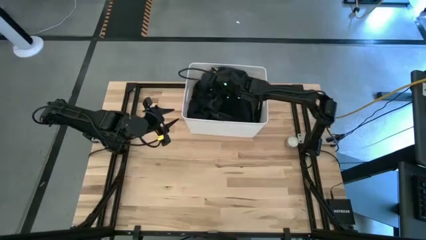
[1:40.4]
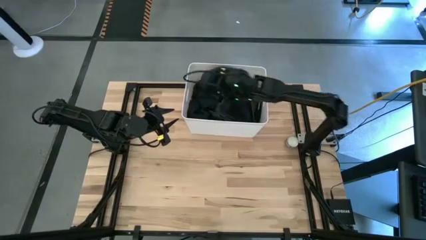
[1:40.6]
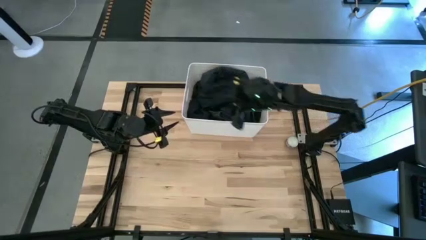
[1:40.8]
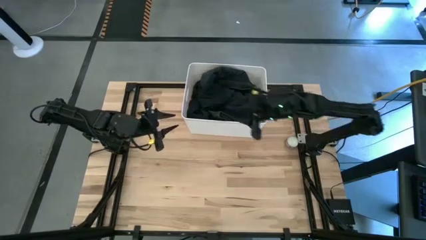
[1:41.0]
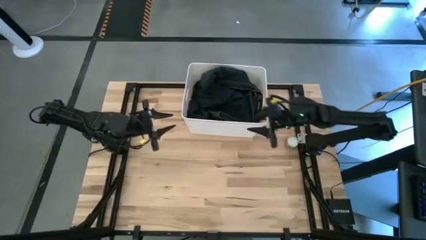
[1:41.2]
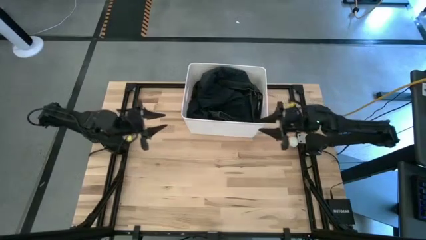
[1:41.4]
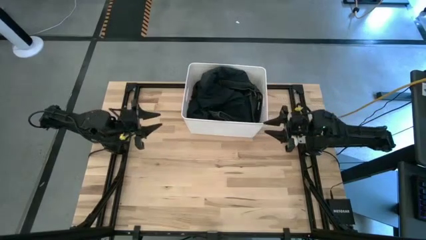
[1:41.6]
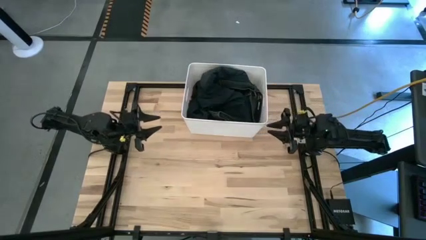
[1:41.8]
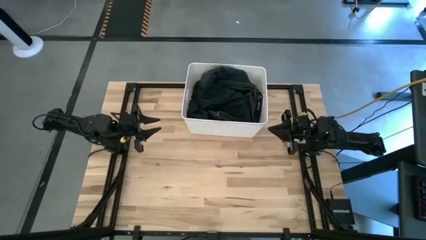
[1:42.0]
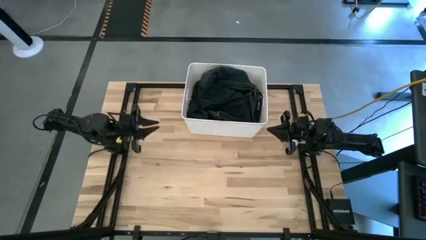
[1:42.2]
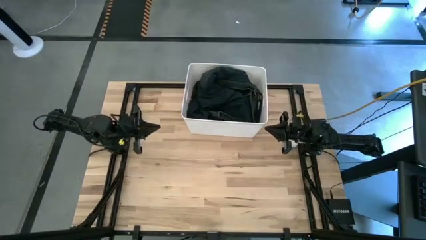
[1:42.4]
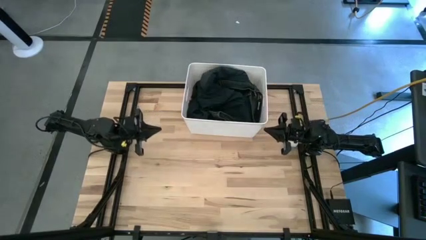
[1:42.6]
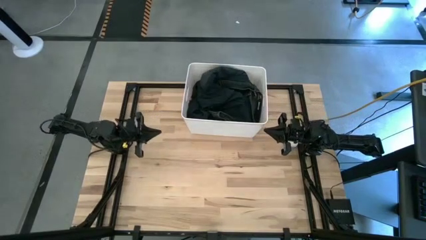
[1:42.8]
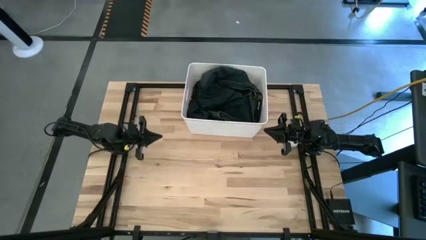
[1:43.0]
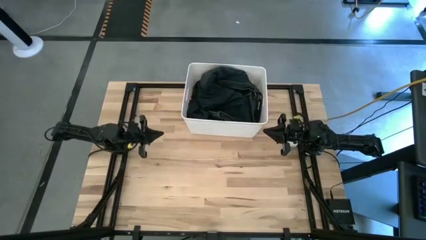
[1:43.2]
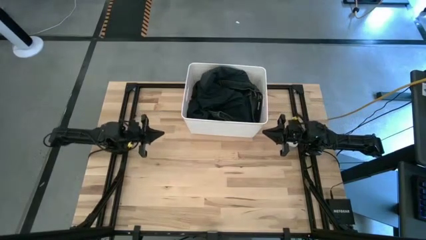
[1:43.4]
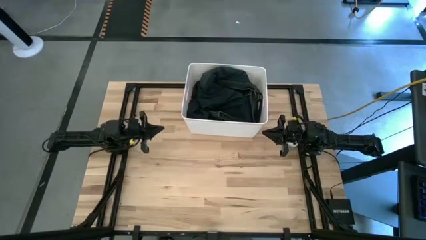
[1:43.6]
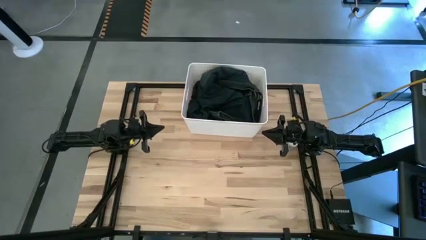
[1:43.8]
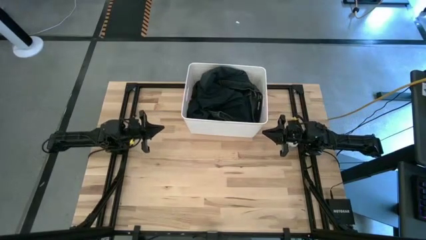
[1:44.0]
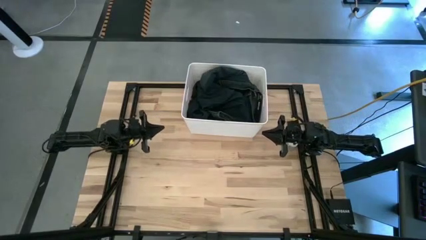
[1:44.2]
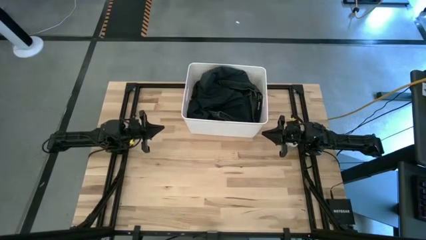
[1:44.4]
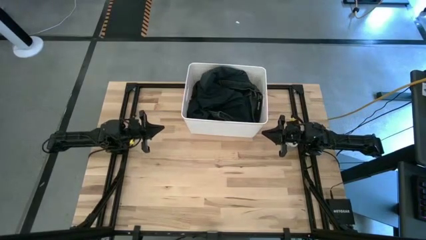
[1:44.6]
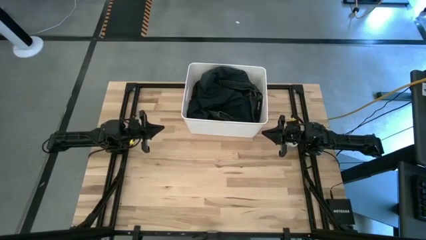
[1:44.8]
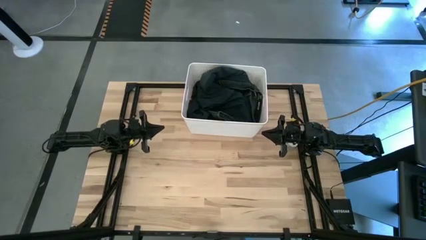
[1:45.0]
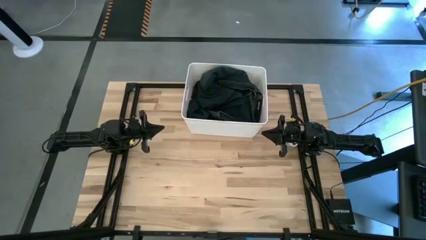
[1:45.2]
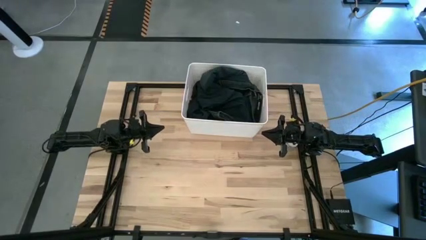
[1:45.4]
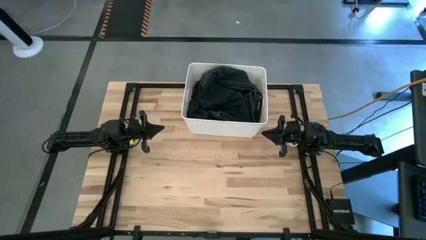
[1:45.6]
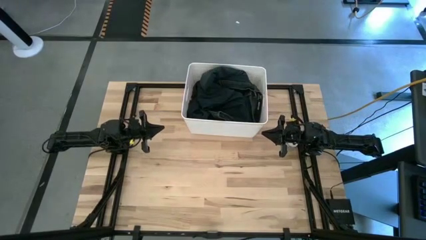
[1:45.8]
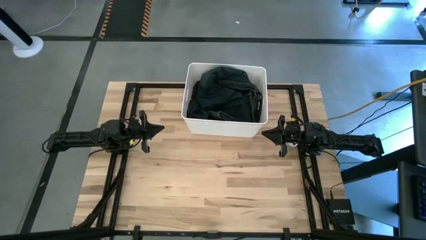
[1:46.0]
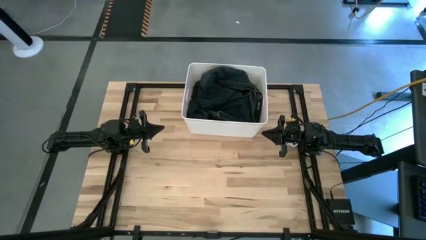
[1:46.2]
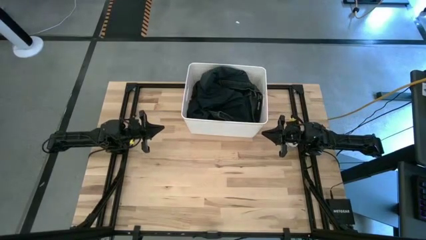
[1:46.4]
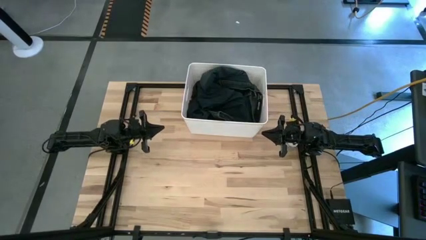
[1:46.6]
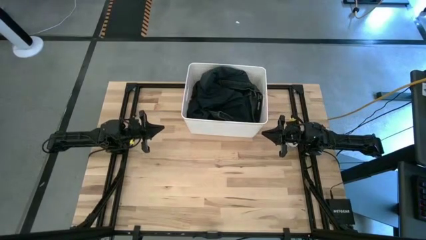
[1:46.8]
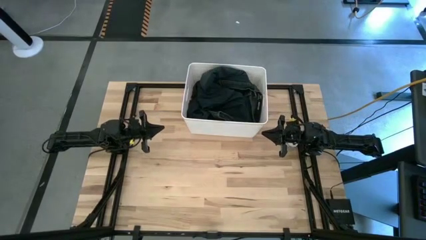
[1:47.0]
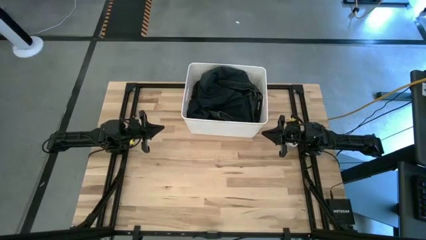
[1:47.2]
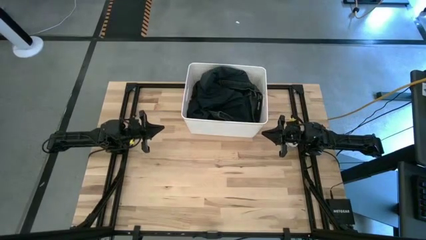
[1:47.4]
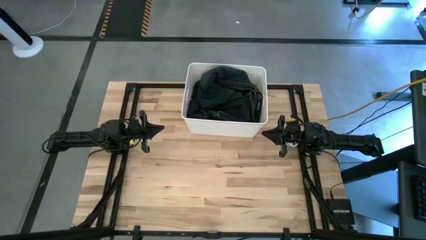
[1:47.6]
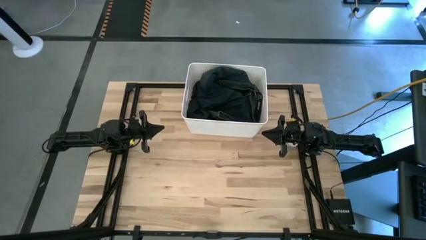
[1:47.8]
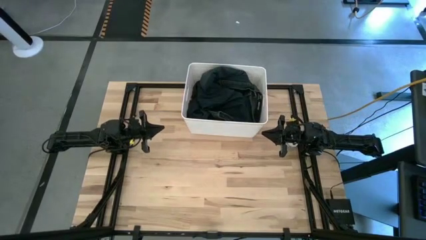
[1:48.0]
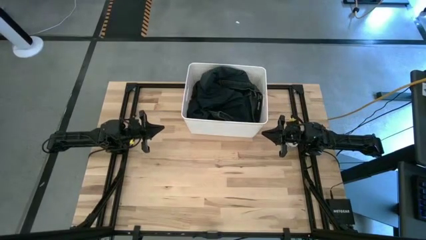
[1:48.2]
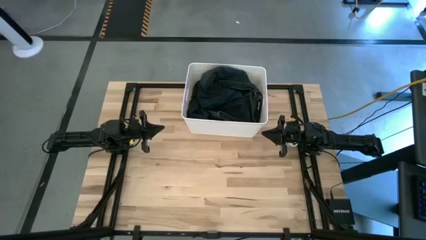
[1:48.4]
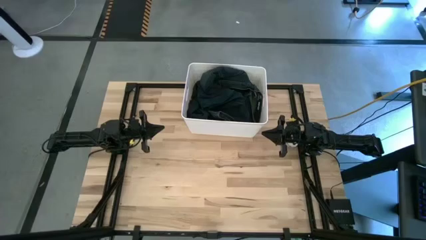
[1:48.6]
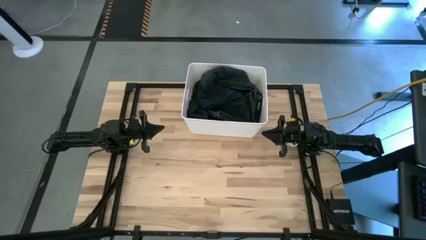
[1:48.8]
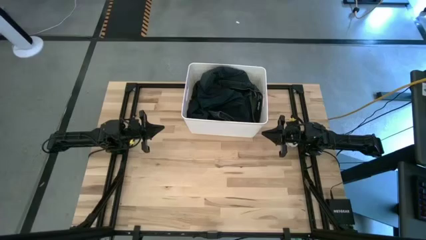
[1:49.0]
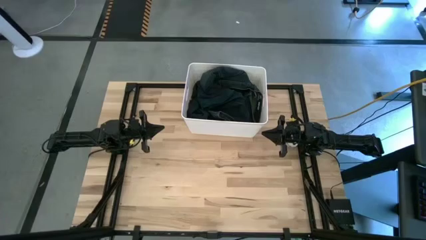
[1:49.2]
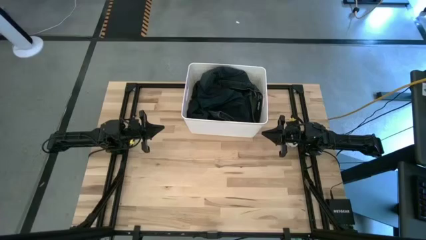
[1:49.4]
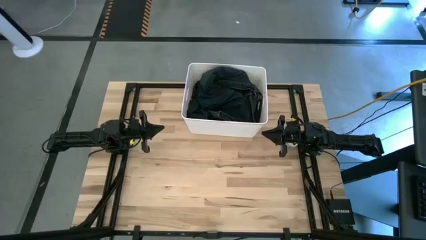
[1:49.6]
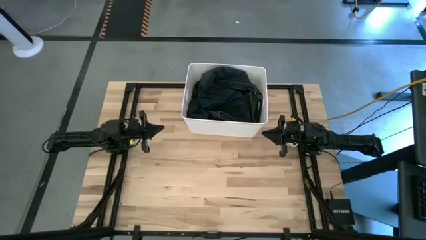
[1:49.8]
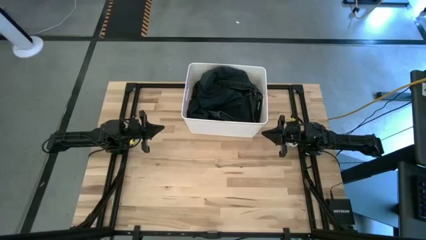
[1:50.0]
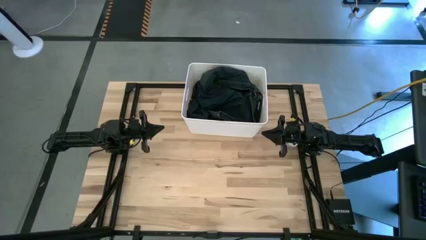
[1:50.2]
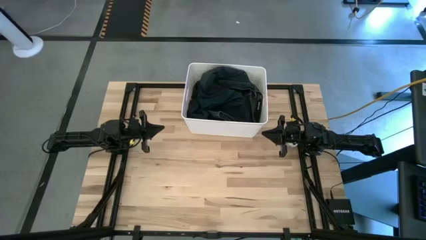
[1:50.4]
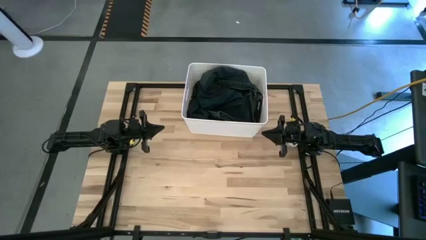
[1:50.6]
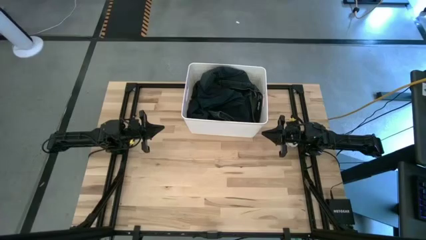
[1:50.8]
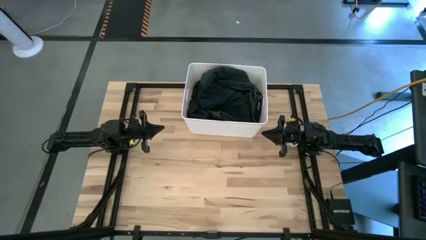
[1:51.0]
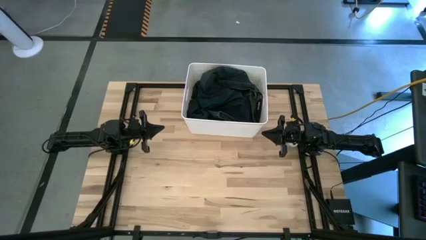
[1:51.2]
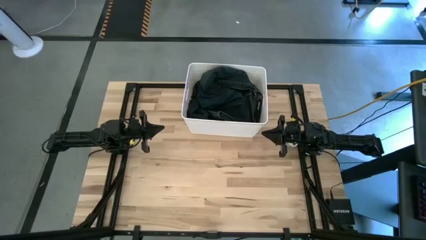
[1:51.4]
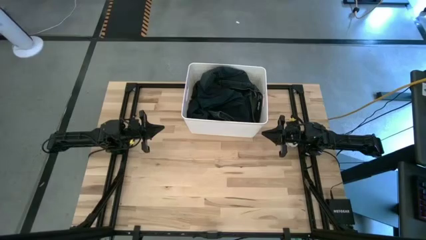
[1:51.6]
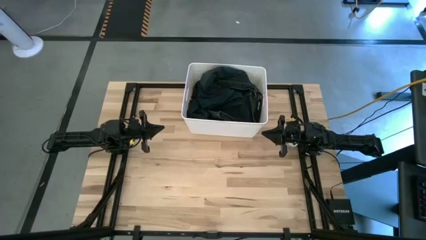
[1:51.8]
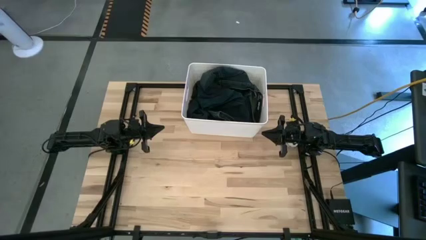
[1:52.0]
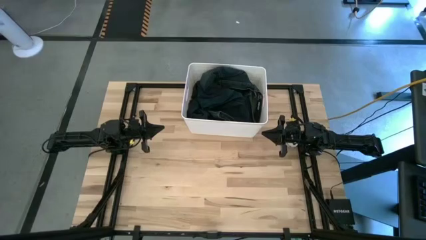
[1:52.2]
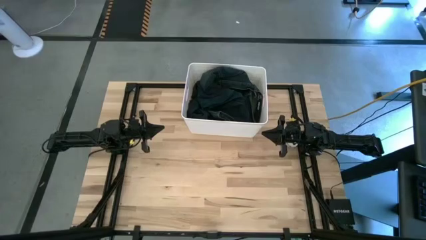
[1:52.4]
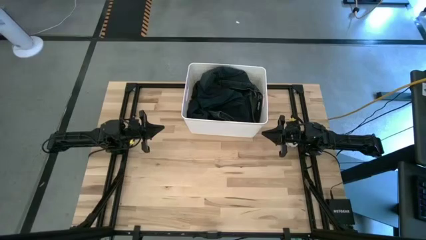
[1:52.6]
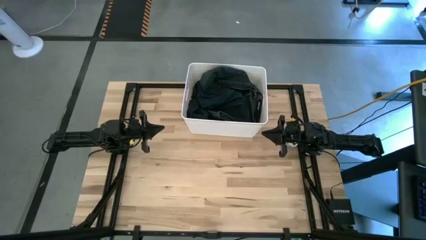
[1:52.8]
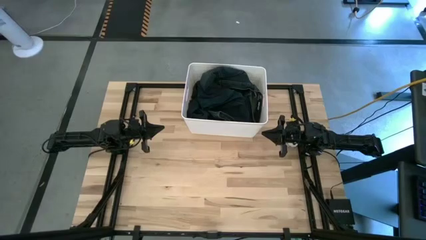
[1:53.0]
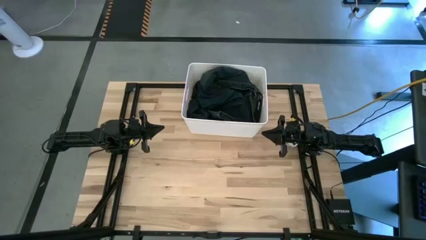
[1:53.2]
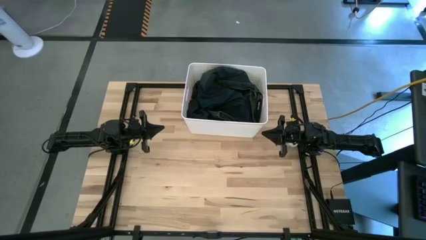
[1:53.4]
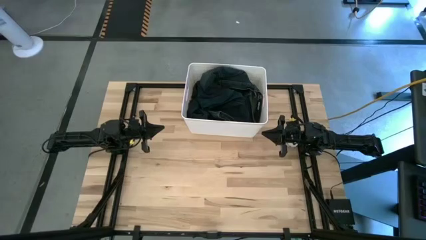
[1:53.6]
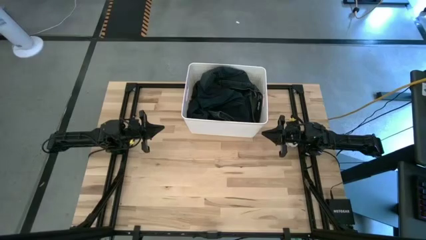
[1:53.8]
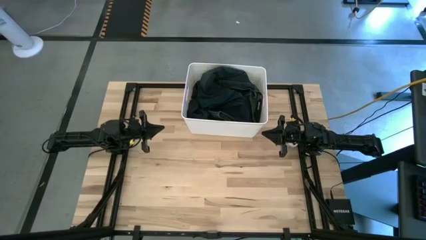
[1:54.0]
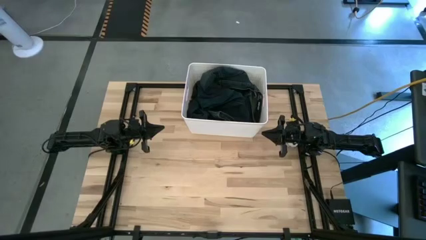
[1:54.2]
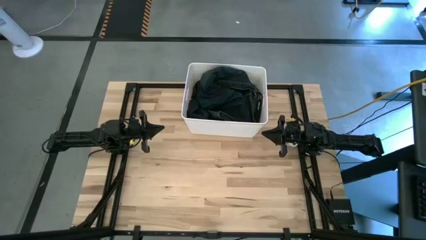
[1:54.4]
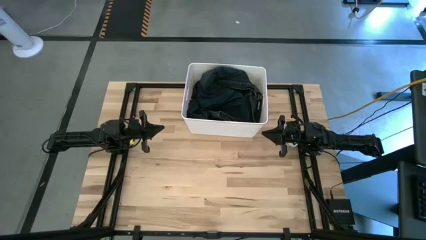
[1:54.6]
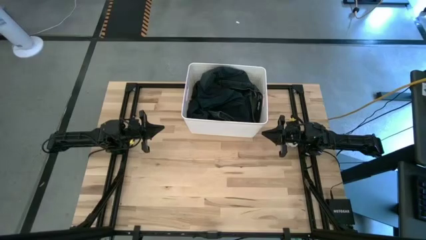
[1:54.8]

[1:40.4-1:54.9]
Task: Sort clothes
Return to Home Position

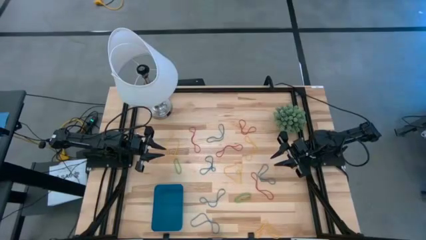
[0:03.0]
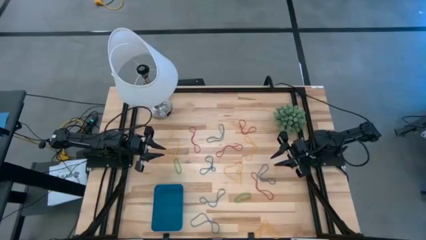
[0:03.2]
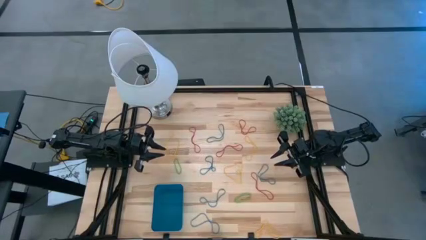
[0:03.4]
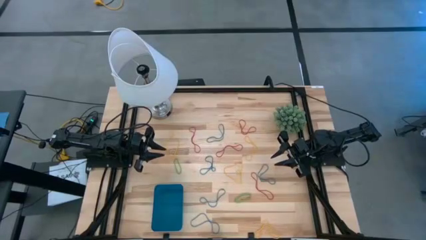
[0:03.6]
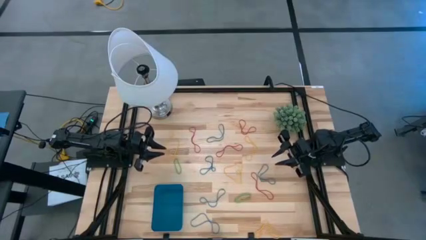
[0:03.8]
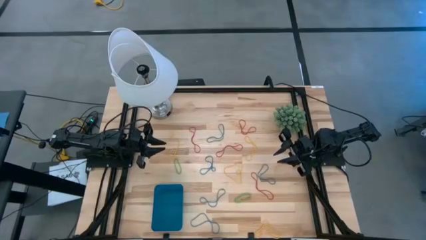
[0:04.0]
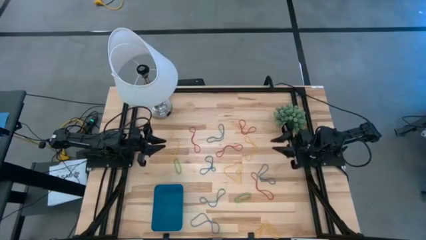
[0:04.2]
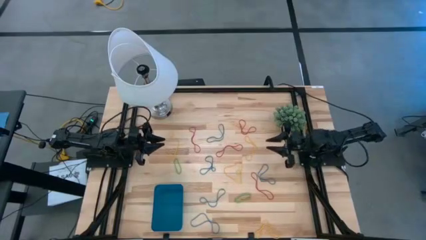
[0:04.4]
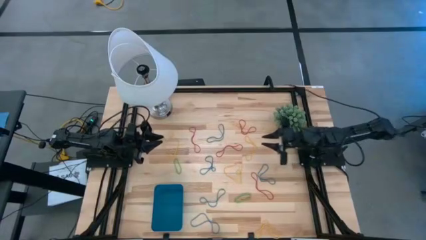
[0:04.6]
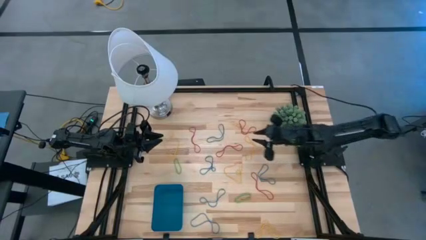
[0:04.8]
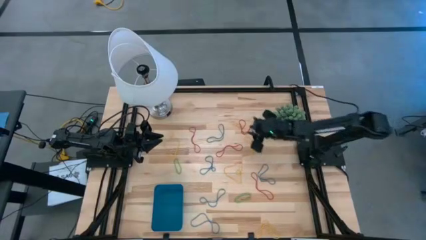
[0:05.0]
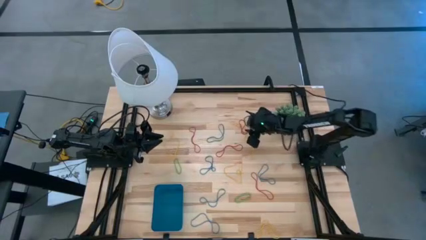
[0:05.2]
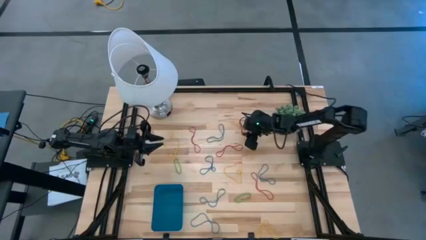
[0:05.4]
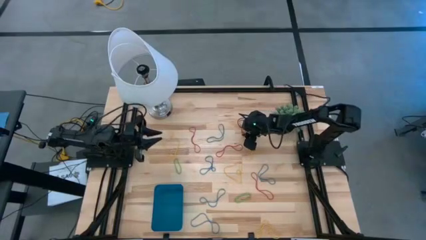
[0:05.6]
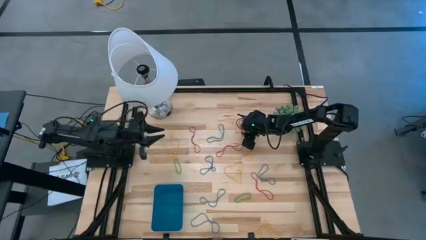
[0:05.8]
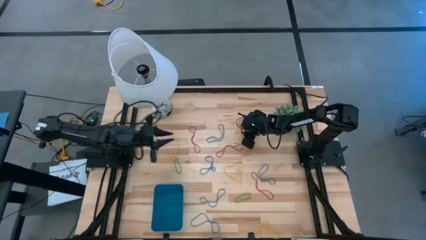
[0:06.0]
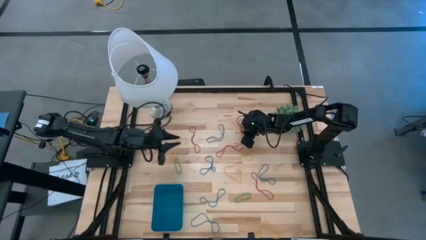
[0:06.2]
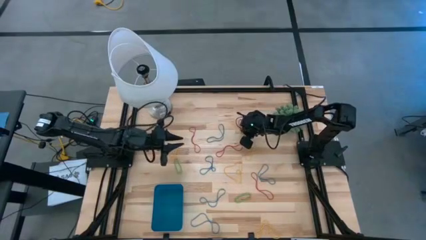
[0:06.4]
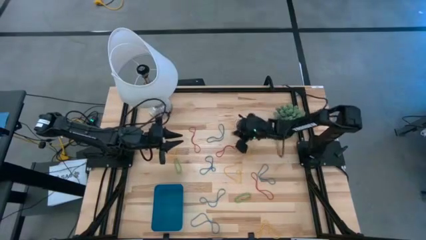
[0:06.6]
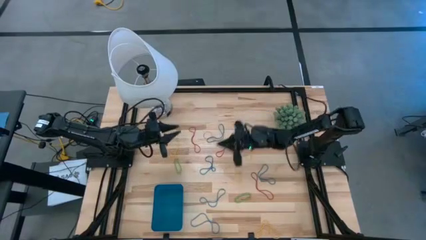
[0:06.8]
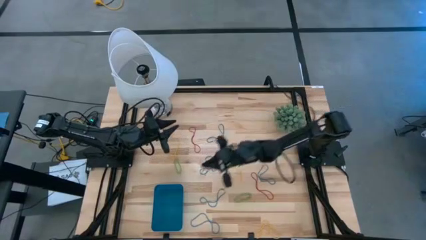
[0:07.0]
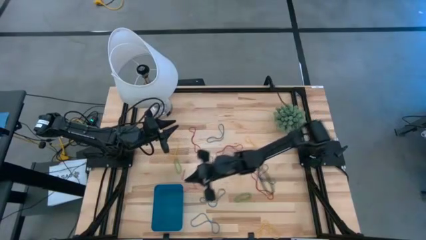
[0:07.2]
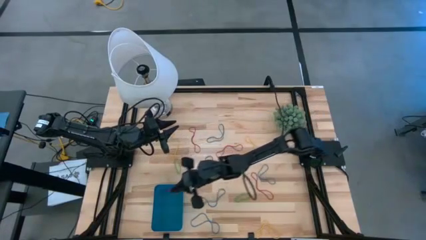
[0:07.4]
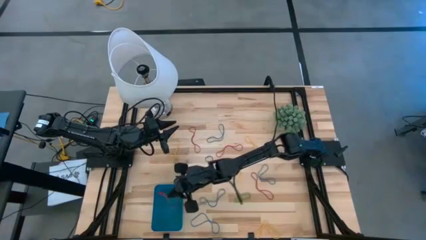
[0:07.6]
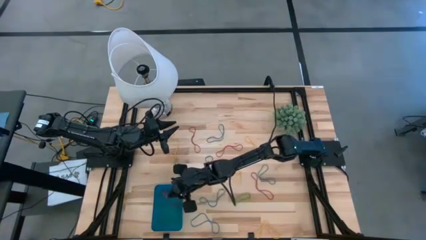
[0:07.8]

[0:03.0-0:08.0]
Task: Pick and place items into bin
Put the red rubber band into the blue bin
